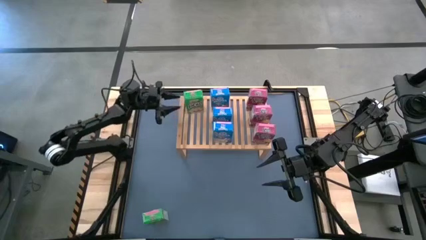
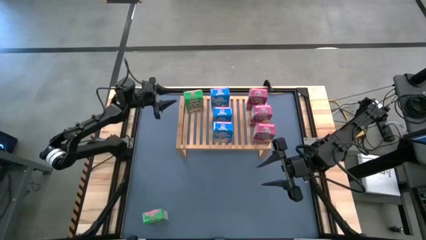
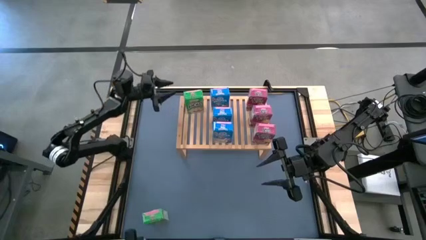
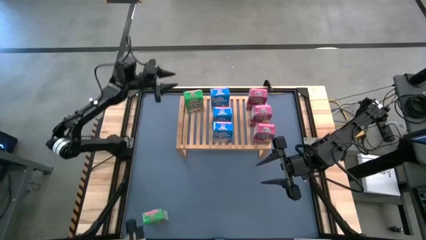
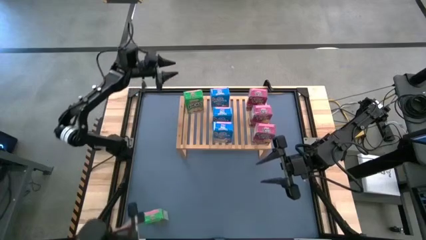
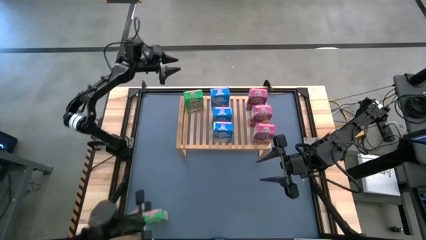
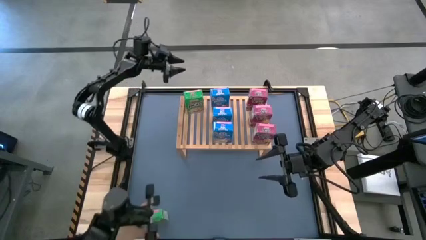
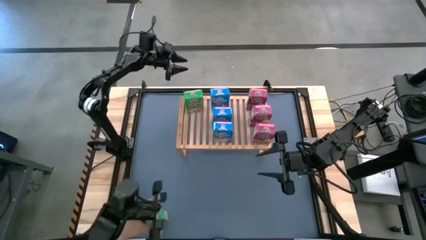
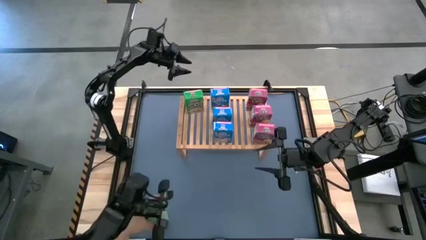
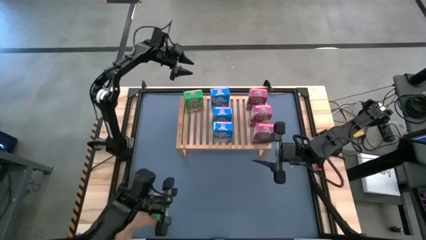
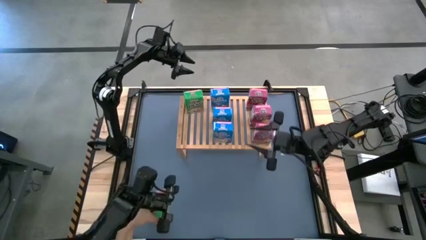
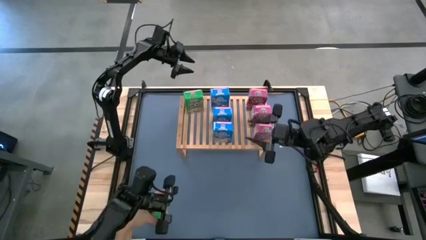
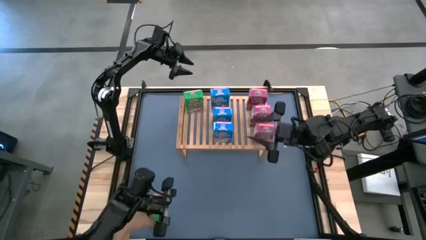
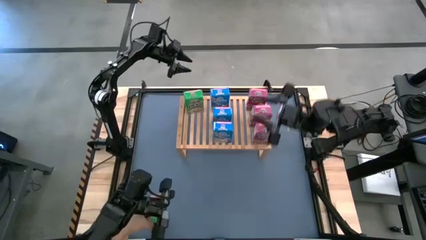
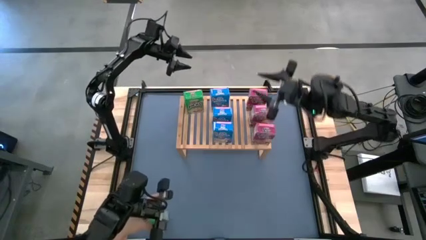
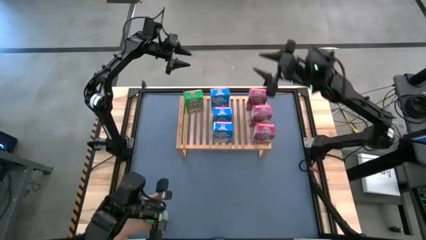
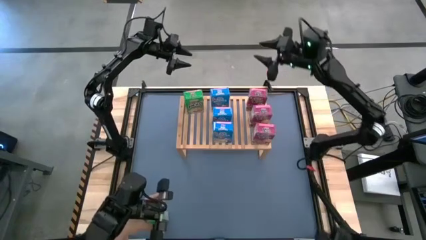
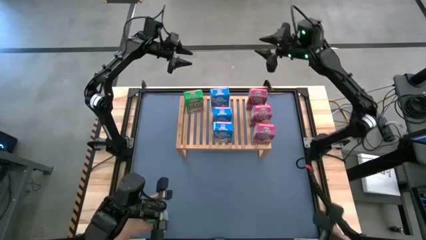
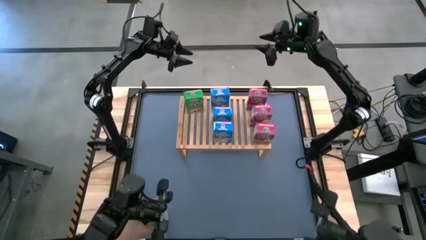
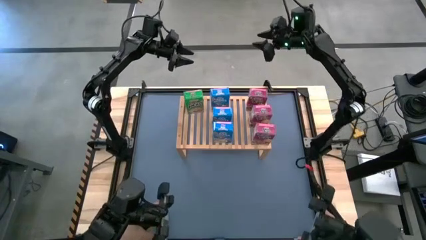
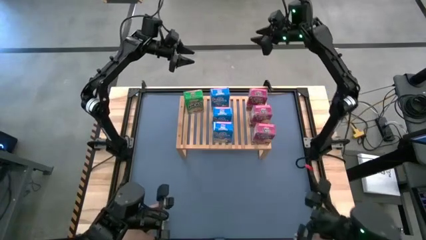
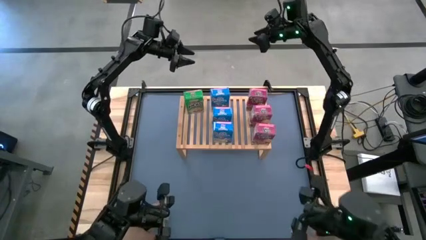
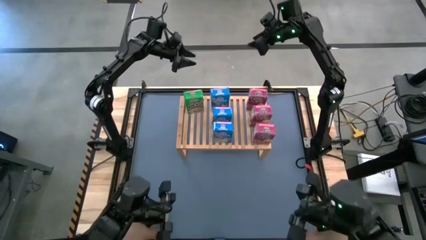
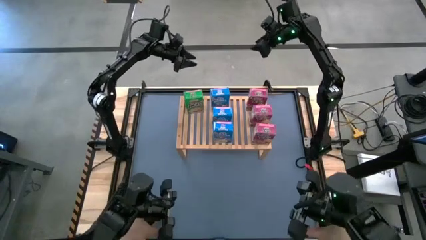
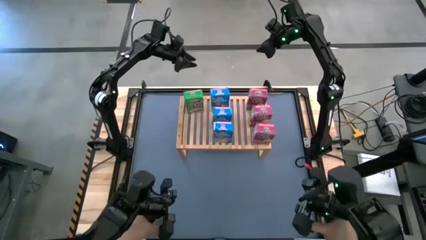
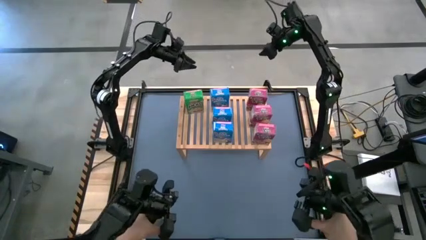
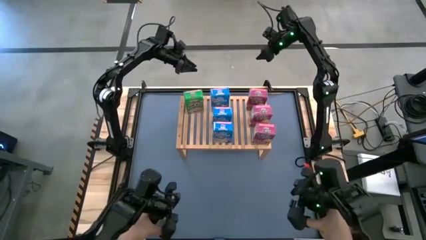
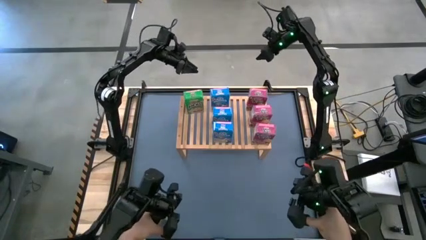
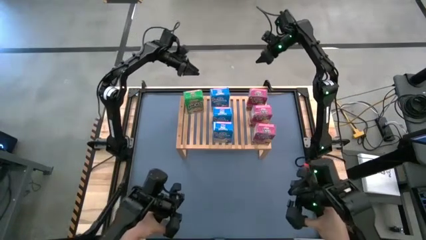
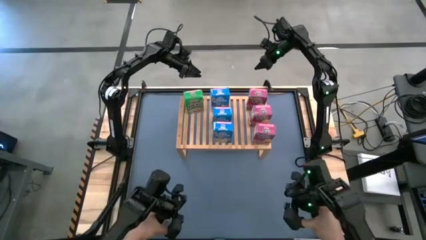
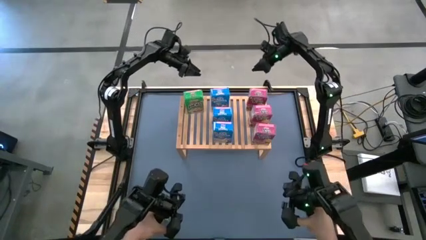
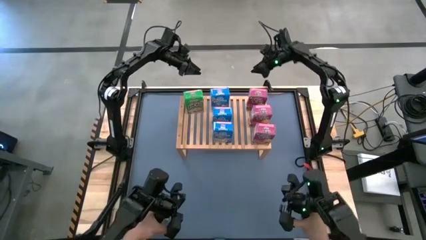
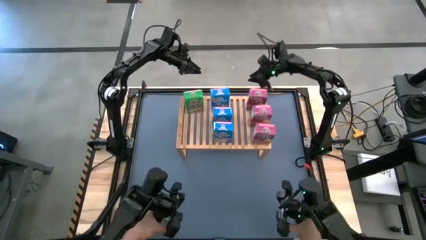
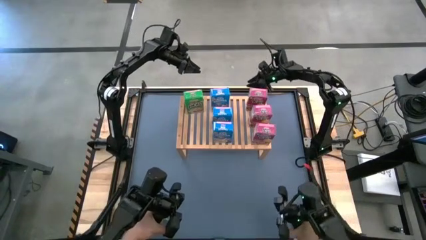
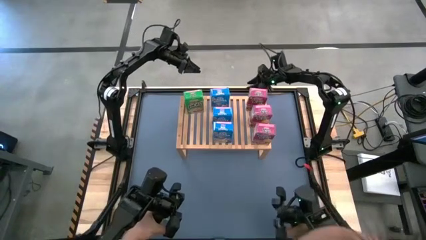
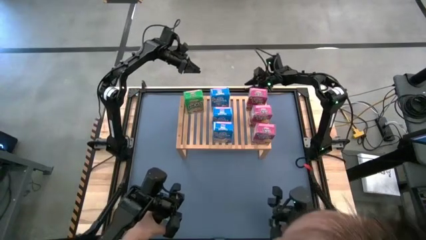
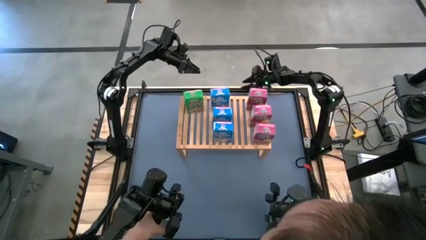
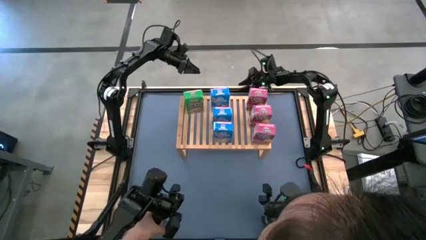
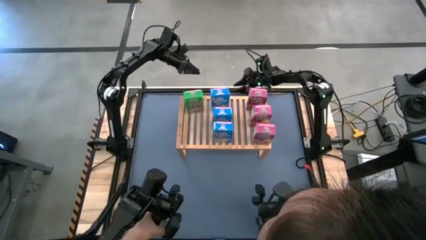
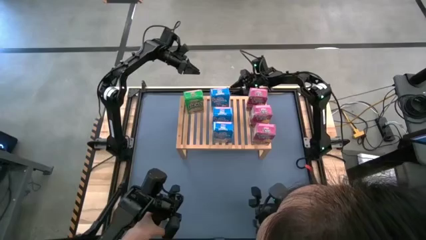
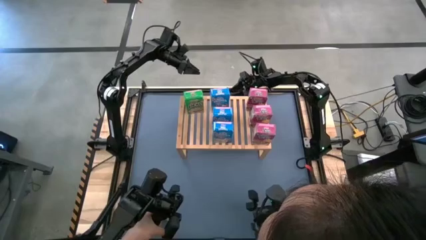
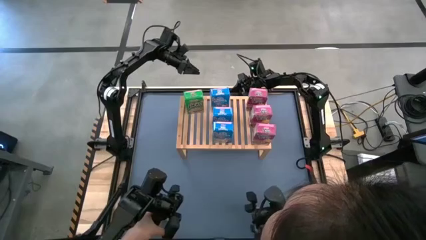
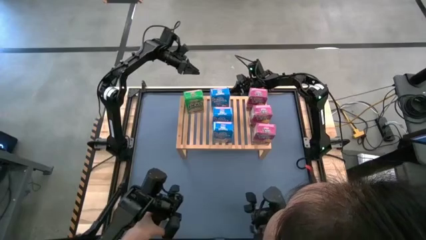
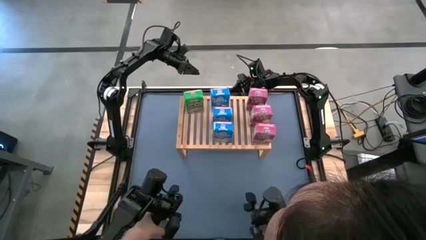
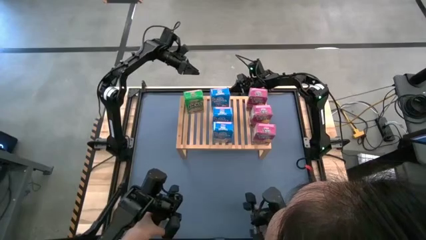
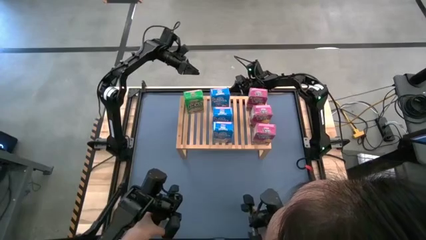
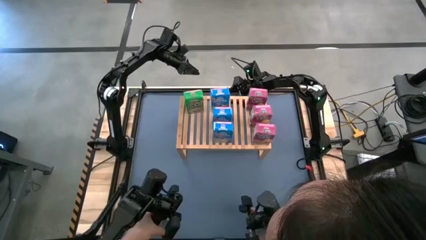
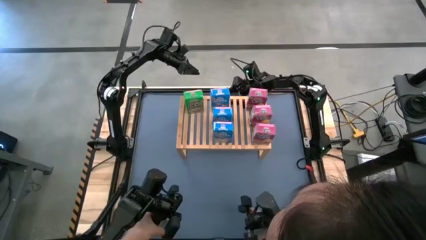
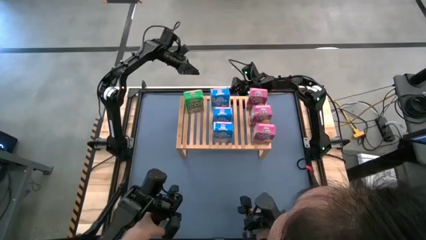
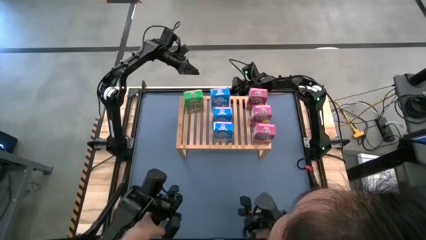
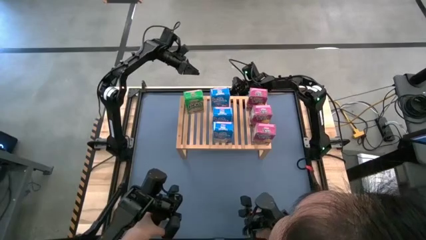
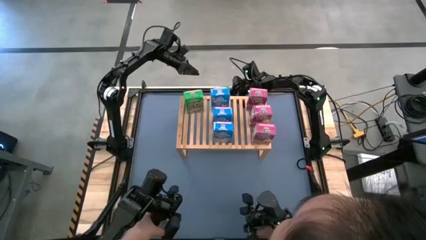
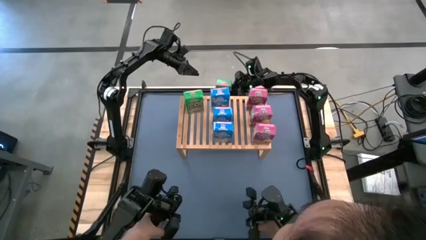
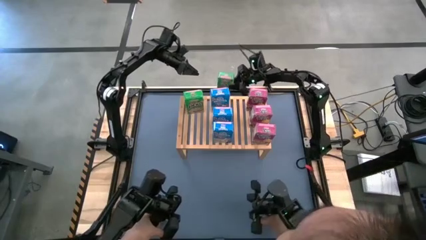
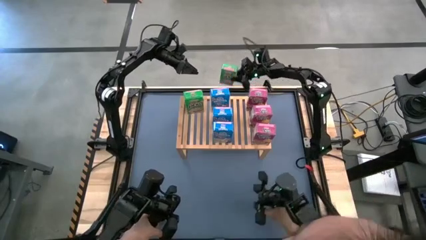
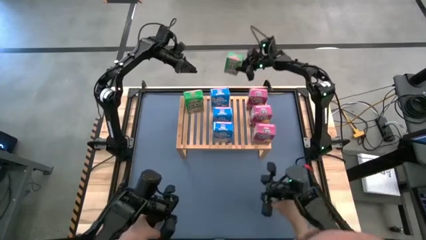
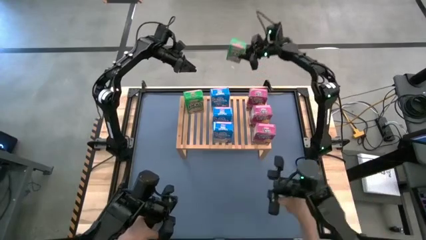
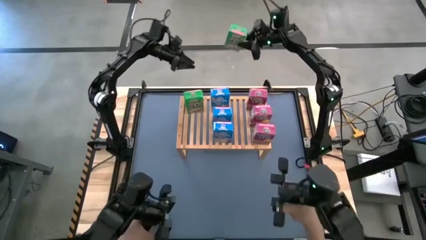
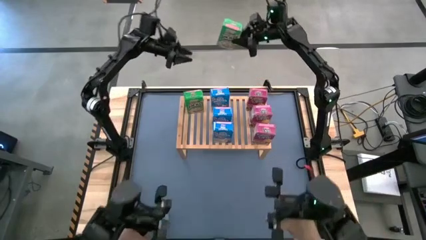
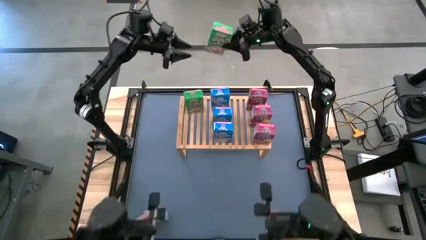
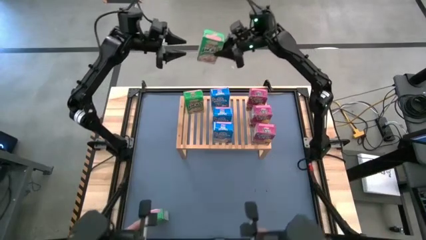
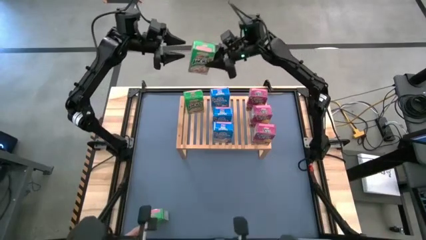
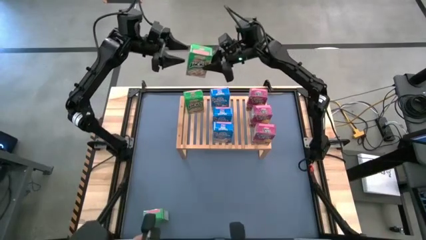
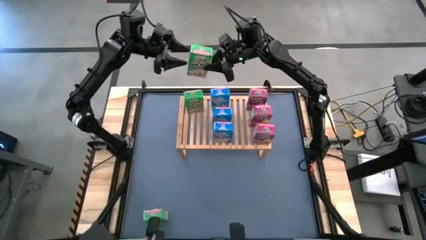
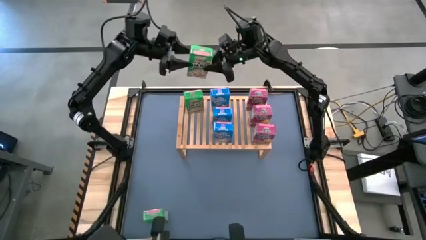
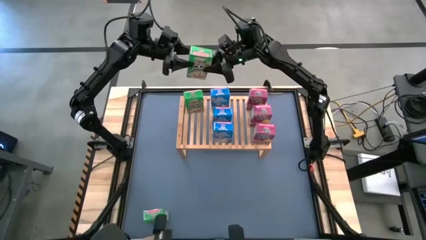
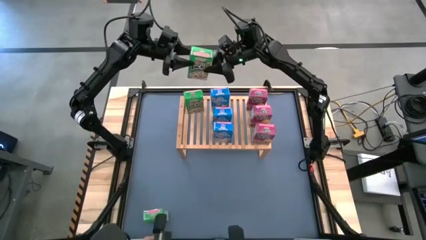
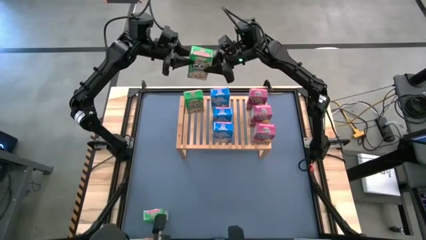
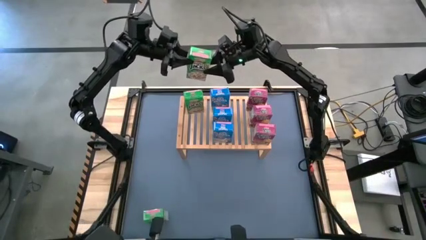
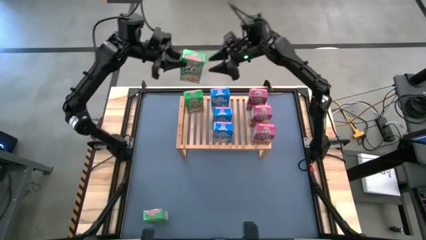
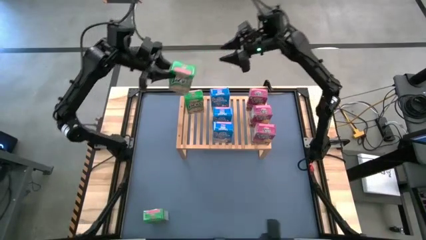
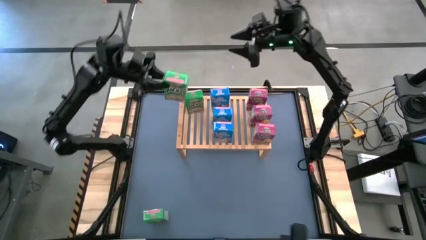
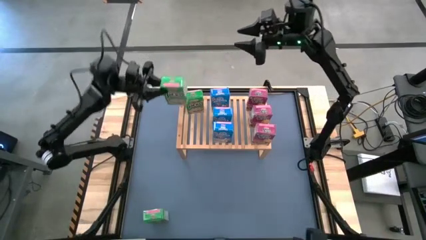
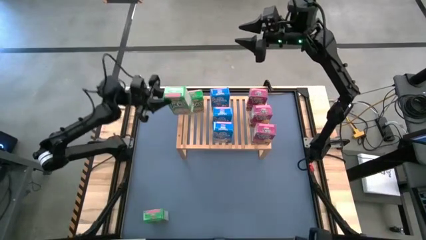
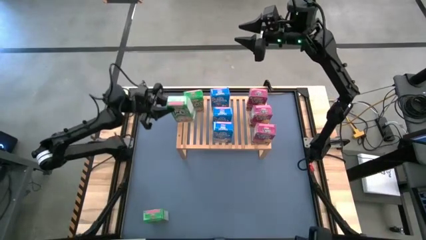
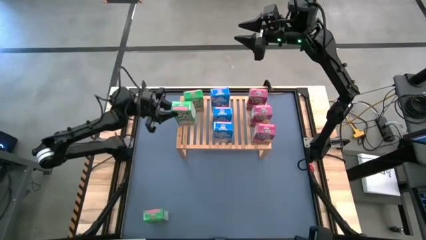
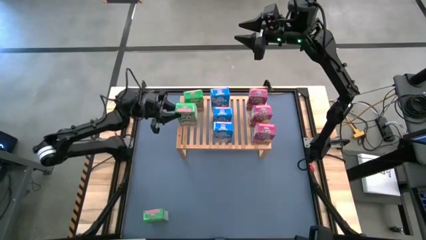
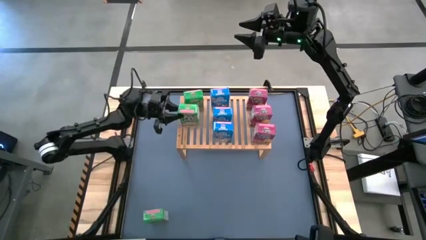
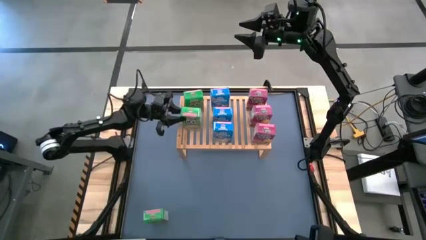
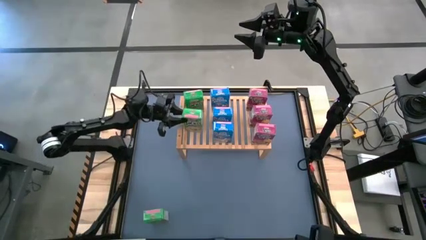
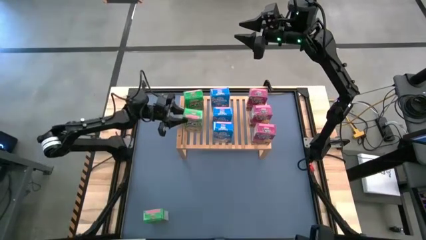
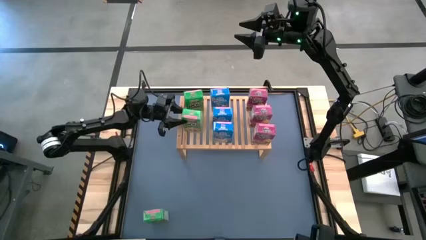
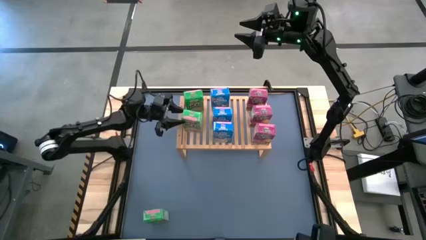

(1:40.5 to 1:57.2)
Task: Stack cereal on shelf
Put the top green cereal box on the shelf

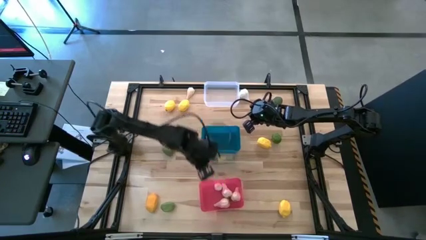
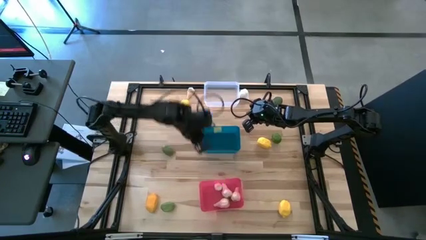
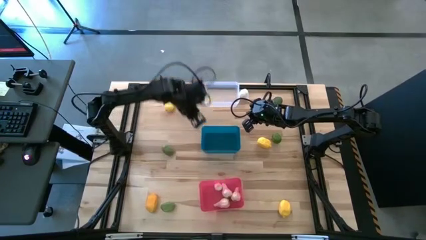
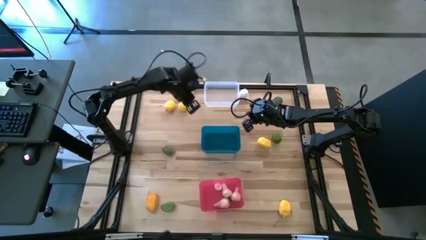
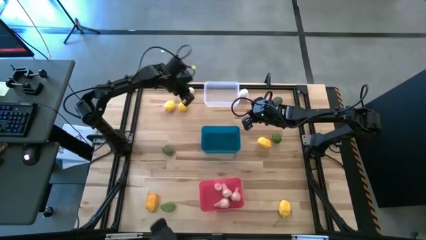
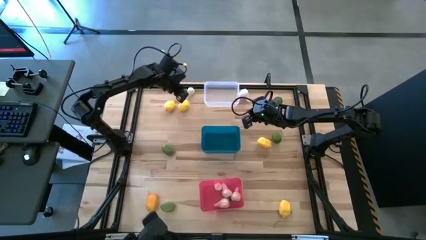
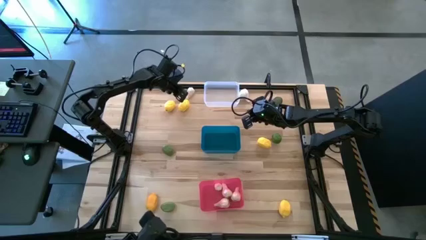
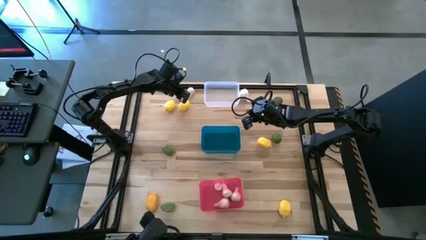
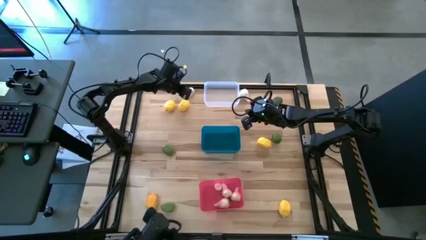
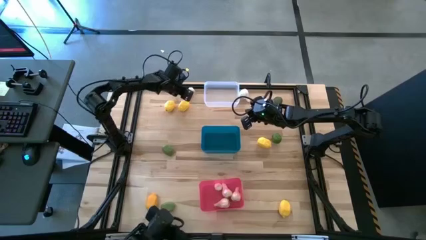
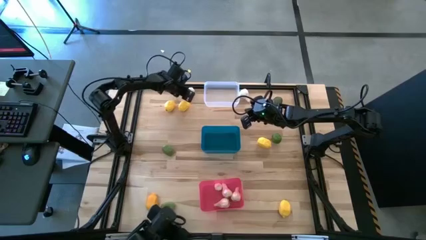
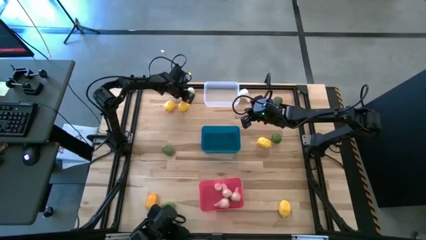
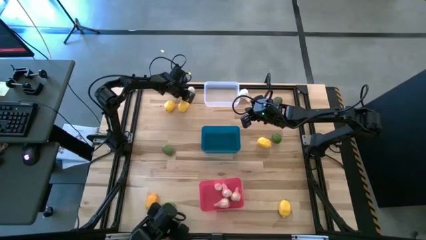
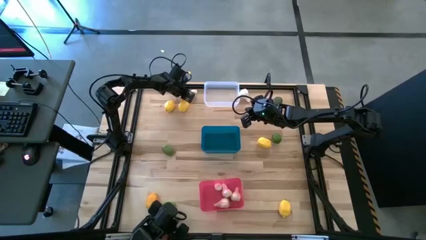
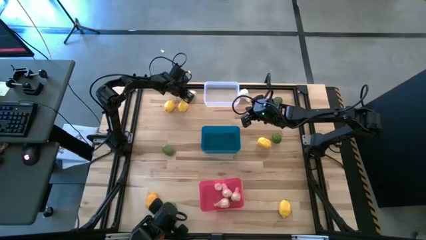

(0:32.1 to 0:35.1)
Task: Sort produce into baskets
Put the top left white garlic into the pink bin
